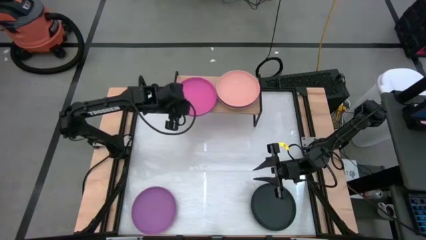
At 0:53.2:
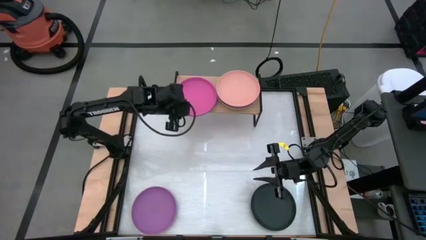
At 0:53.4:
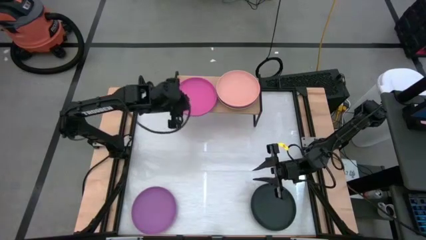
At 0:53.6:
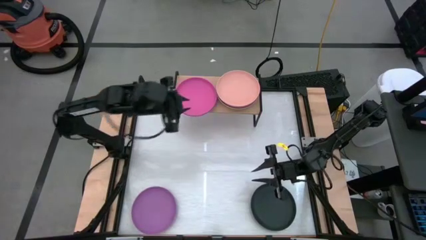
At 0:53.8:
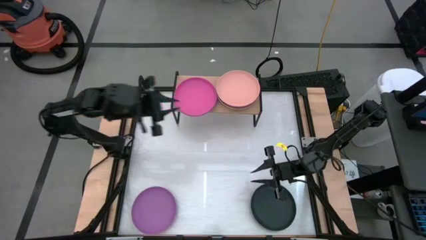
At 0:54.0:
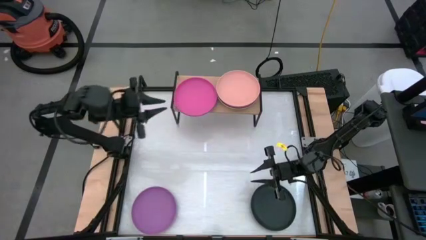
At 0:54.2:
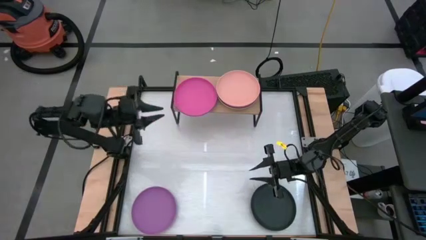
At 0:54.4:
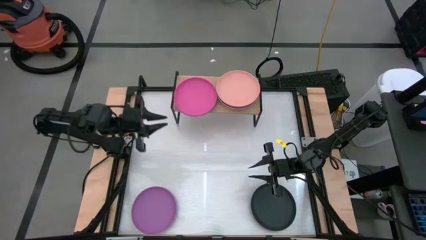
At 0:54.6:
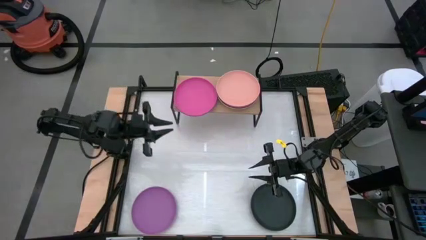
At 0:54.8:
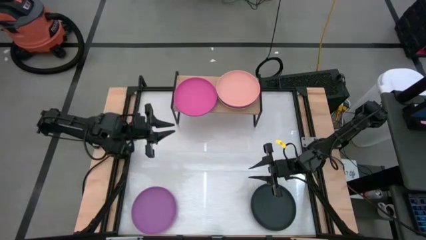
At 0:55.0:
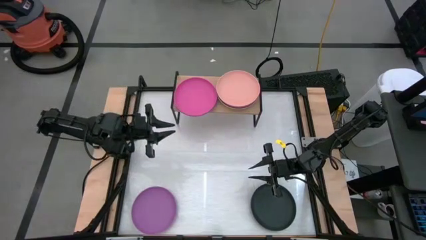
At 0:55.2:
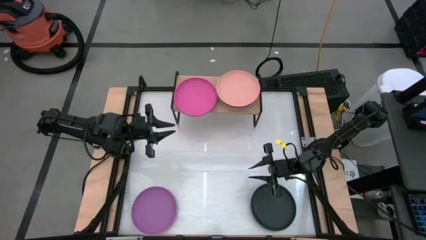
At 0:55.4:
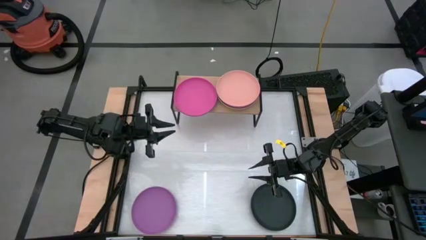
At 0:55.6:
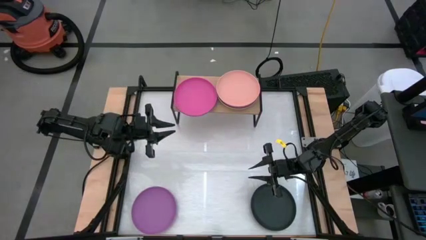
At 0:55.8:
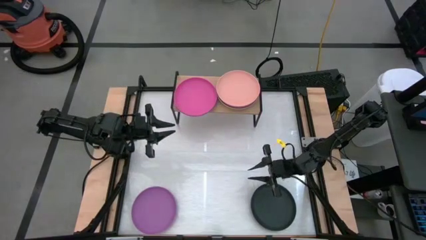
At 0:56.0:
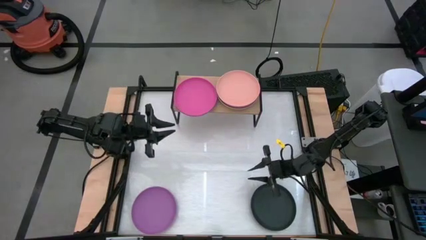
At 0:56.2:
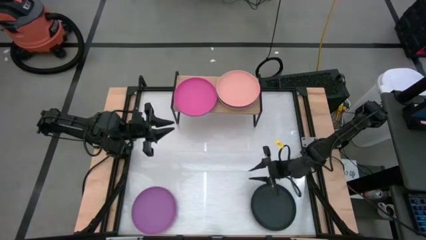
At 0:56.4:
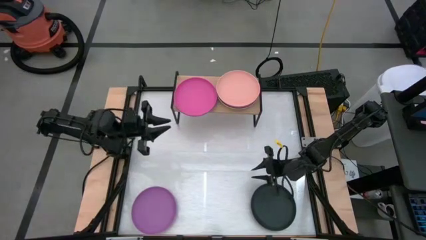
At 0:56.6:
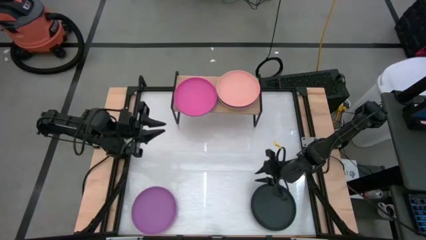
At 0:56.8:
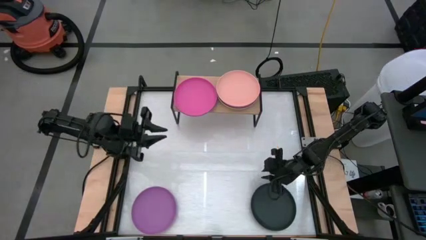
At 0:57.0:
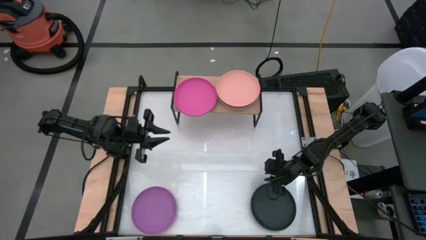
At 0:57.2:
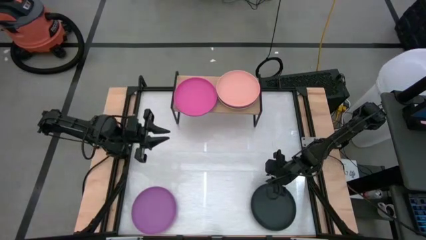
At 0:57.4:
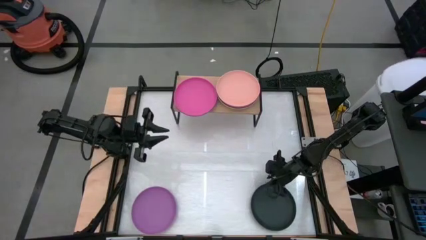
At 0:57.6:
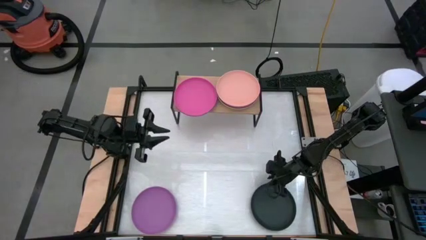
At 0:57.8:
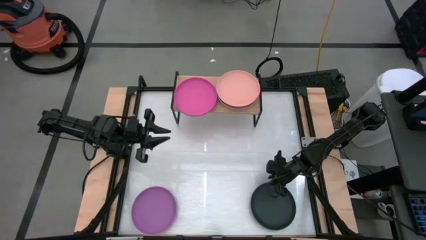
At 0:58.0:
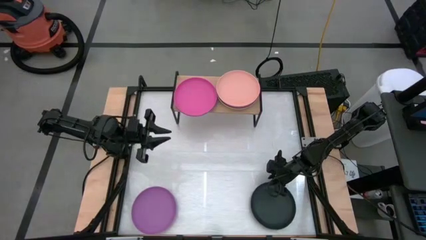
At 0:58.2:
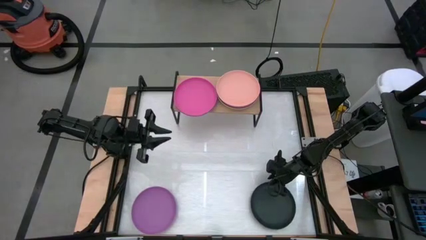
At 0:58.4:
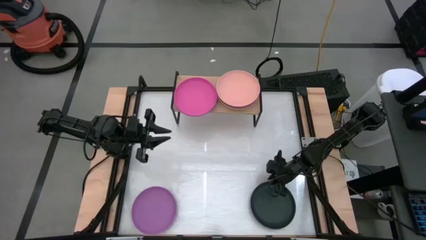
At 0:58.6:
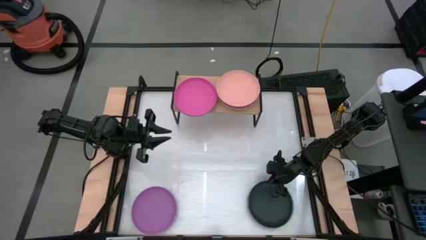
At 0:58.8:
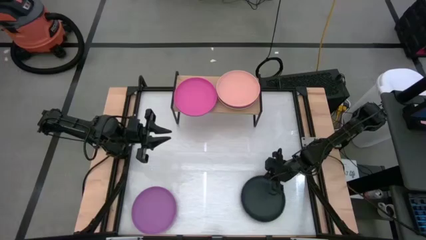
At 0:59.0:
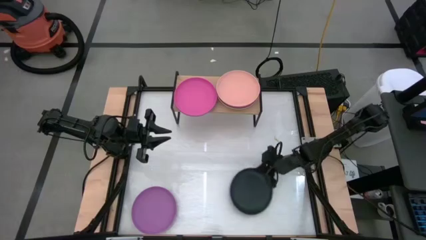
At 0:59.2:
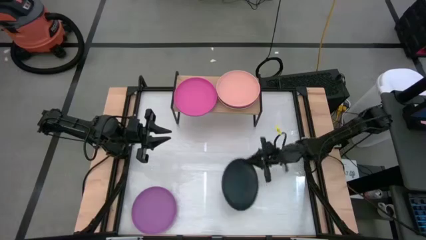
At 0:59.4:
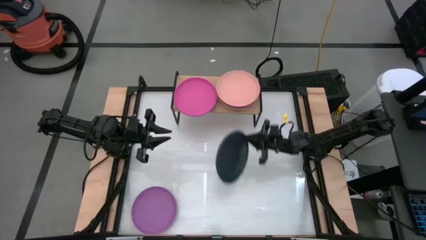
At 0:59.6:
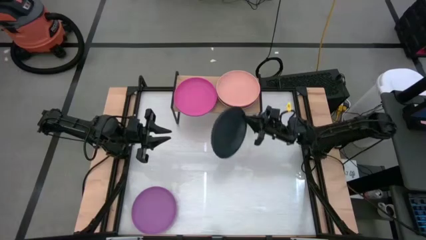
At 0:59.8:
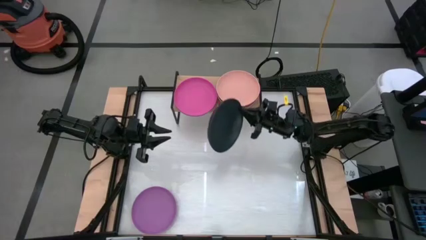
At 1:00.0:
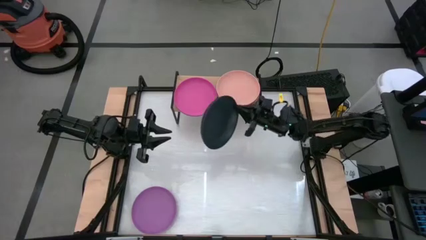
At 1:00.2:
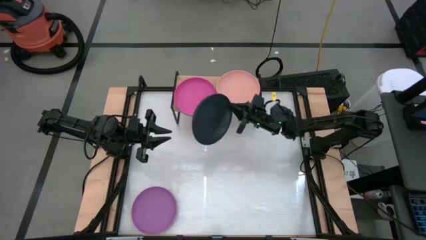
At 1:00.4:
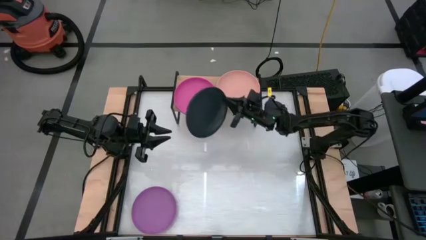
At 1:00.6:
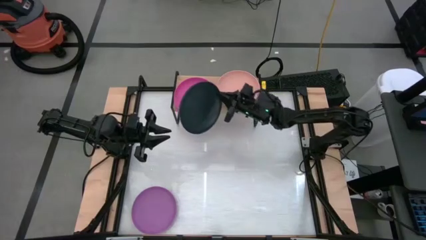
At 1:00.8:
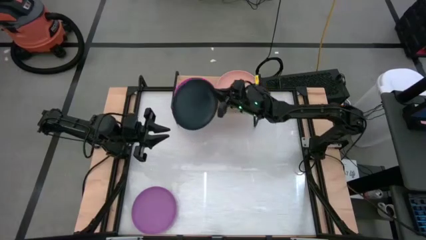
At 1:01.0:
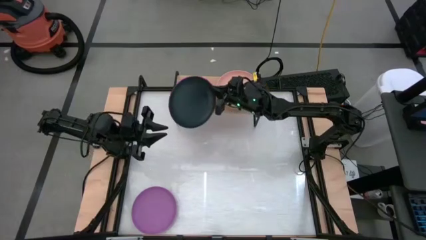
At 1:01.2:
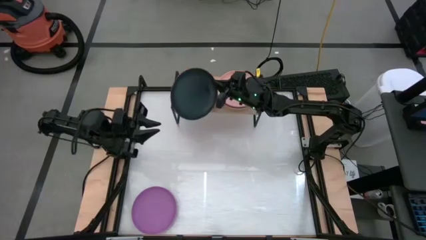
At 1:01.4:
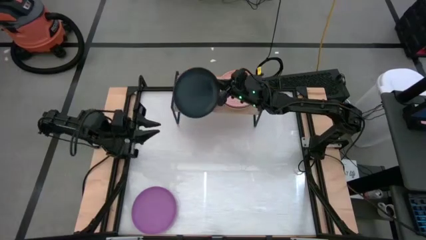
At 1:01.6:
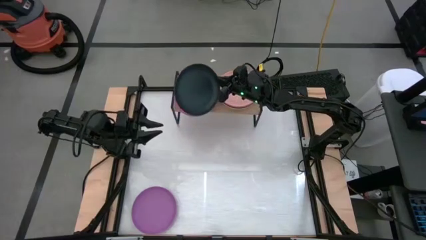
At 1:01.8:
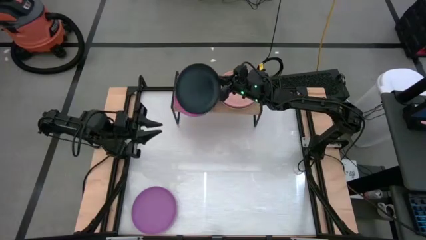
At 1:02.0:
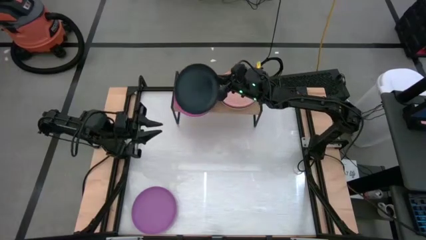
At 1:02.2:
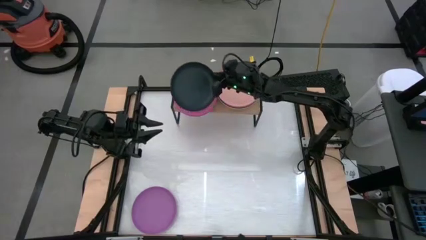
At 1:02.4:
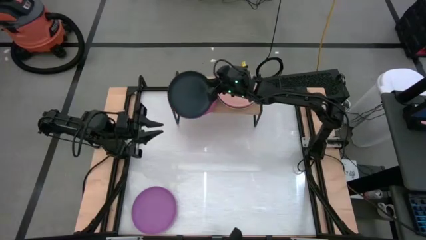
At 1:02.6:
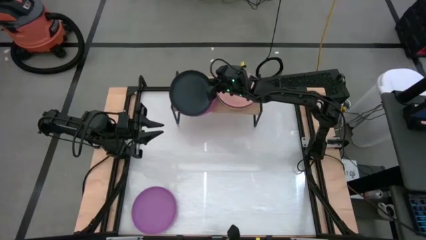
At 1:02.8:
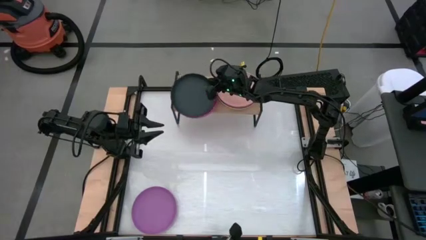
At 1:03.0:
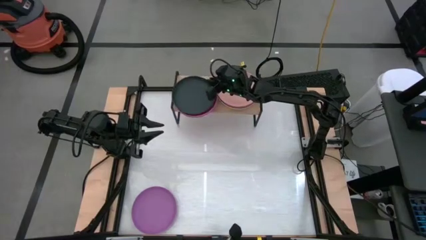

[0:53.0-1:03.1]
Task: Place and stack plates onto a shelf
Stack the black plate on top of the purple plate on the shelf

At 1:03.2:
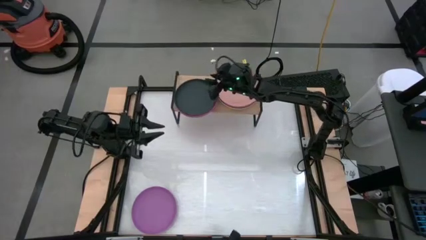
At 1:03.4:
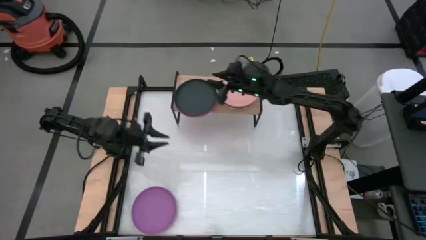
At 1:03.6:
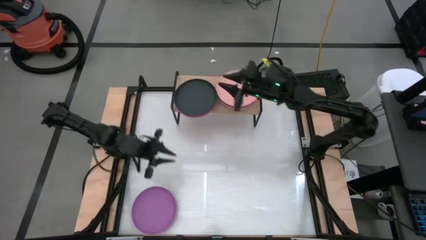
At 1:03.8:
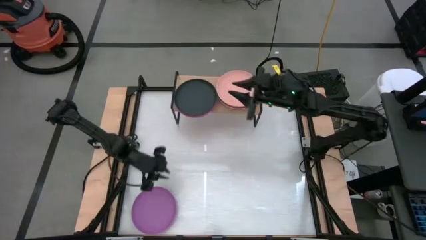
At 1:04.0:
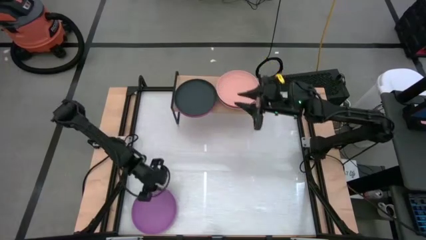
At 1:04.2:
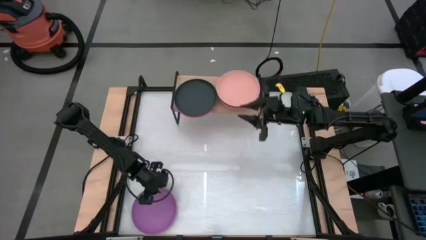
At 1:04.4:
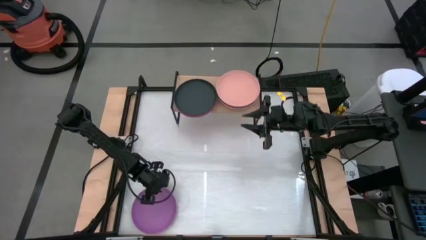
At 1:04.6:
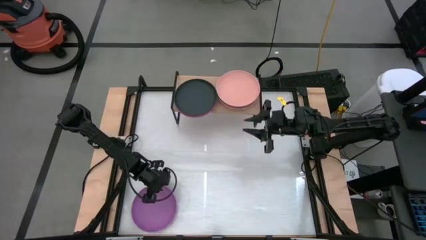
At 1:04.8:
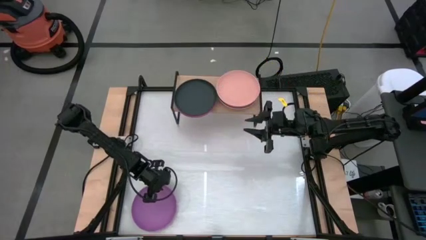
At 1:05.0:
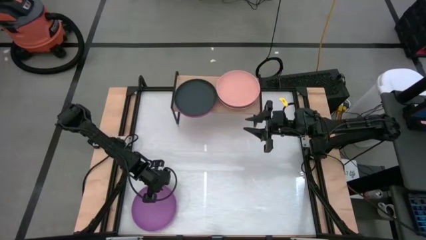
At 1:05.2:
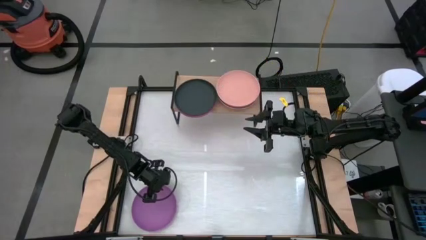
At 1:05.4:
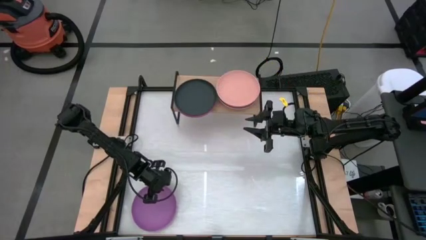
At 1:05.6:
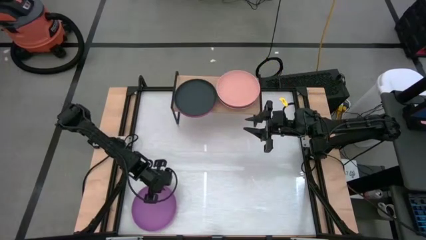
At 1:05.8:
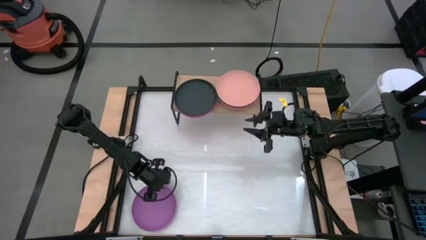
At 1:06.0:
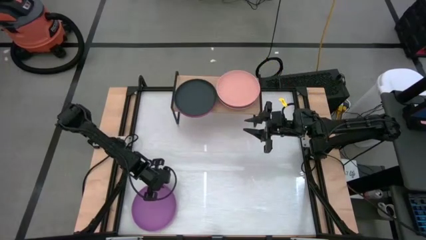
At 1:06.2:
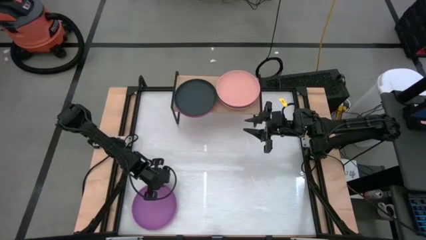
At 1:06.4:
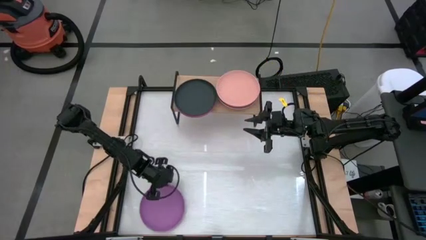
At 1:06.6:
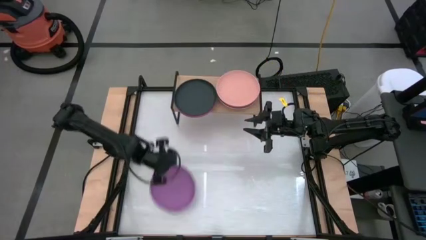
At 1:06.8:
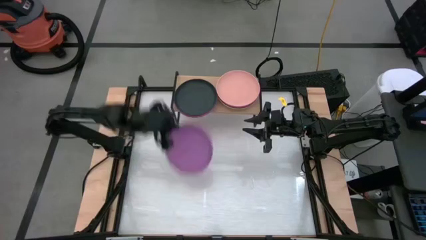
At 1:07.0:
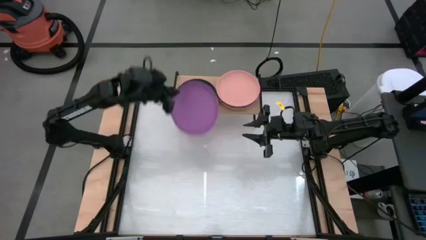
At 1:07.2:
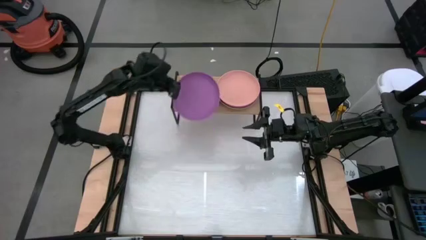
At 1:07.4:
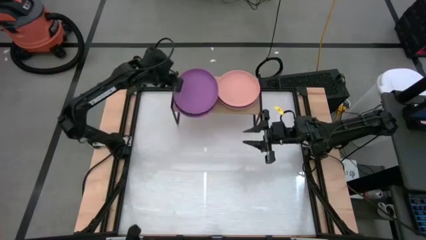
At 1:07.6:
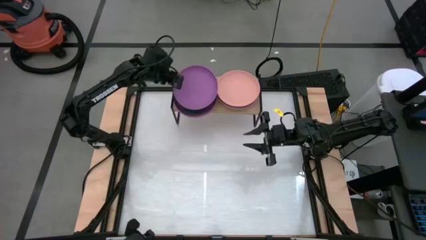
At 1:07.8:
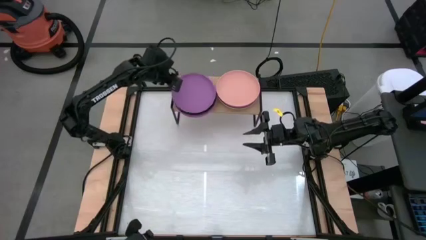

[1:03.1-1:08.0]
Stack the purple plate on top of the black plate on the shelf

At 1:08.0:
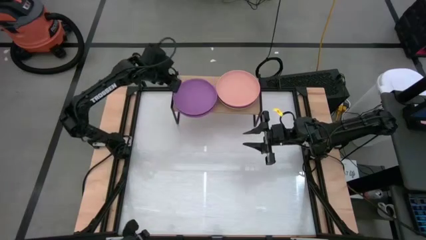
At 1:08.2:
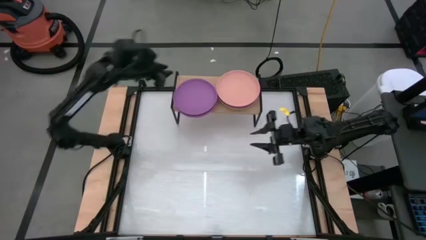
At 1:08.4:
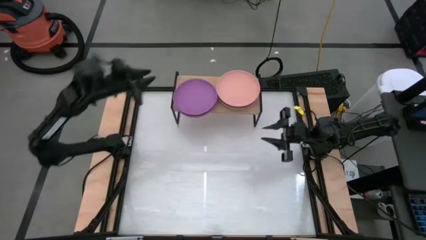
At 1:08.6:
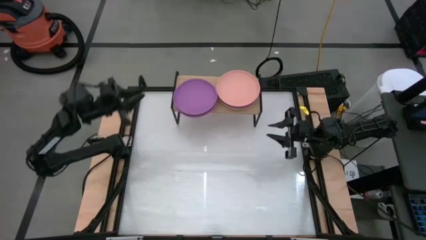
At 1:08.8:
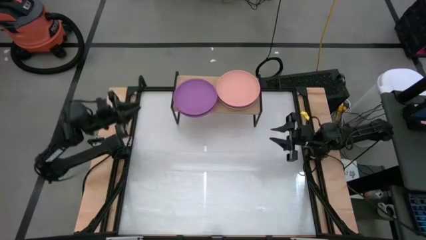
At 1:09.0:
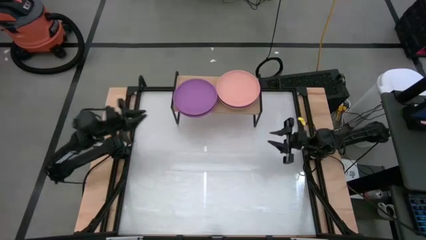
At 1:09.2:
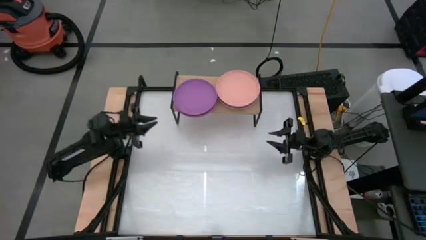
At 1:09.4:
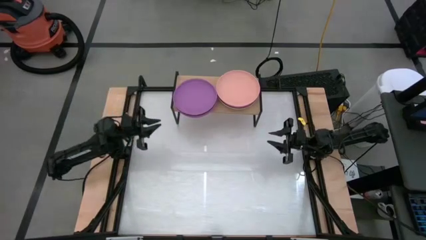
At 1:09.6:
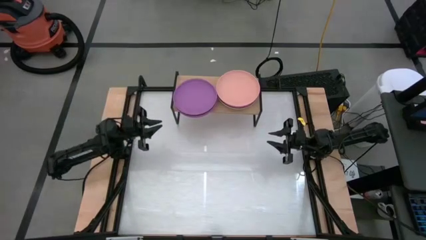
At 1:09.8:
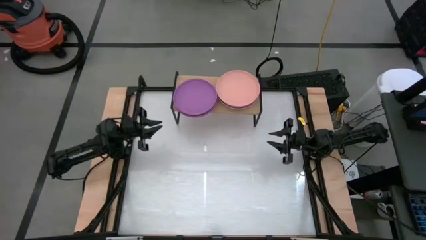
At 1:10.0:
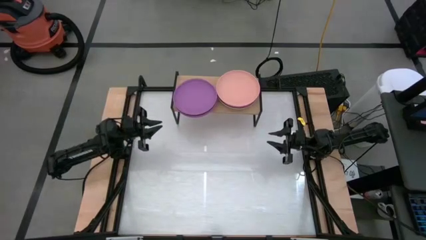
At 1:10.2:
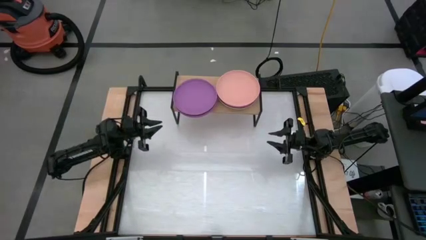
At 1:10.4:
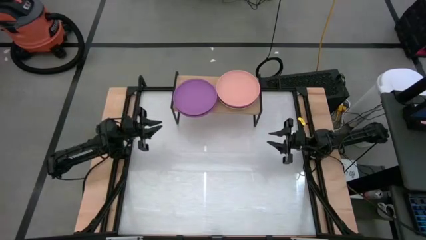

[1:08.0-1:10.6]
Return to Home Position

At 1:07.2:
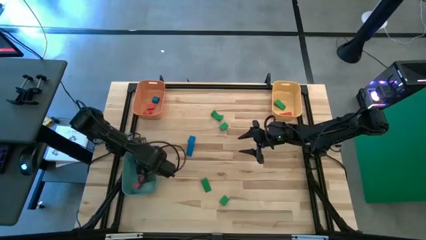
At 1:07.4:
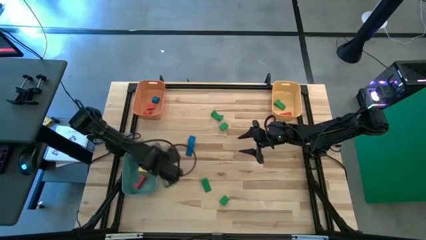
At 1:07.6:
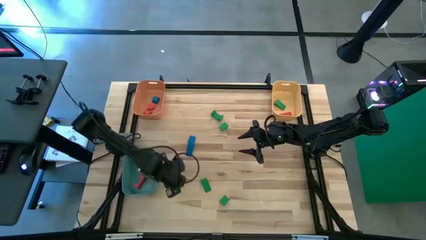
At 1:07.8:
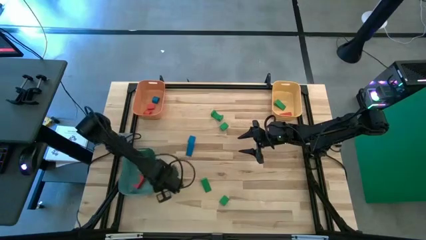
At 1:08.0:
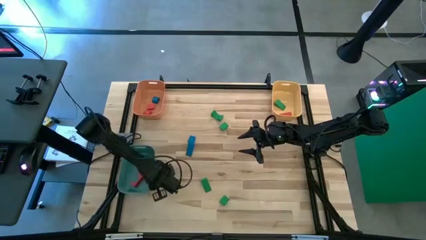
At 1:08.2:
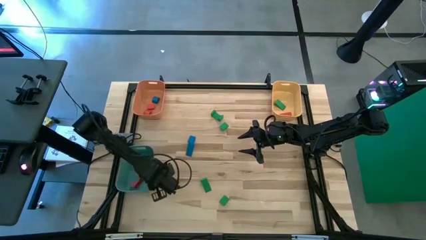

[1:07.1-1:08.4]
Task: Sort blocks by size
Adjust the blue bin
